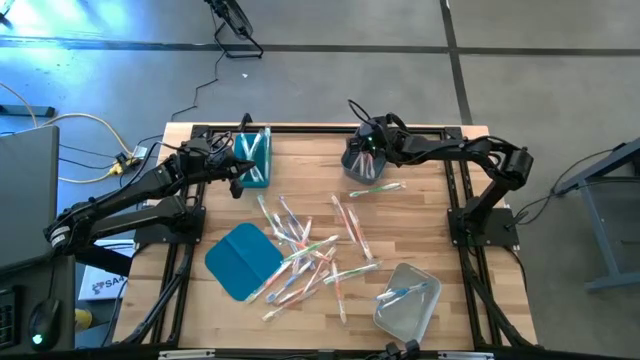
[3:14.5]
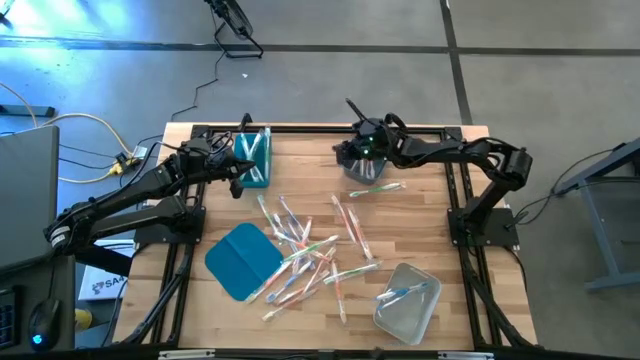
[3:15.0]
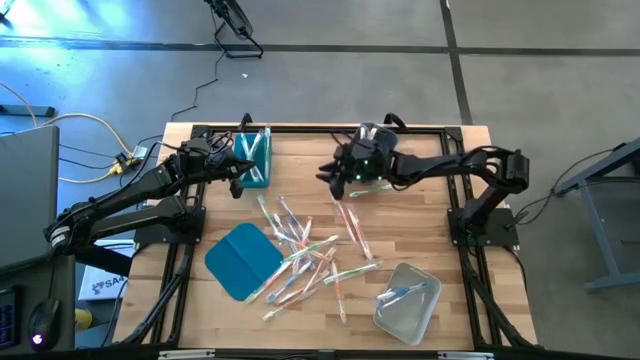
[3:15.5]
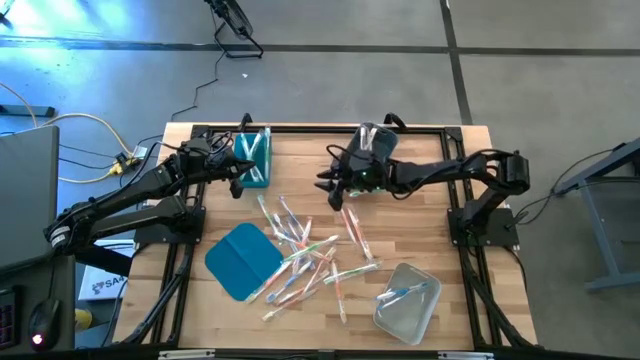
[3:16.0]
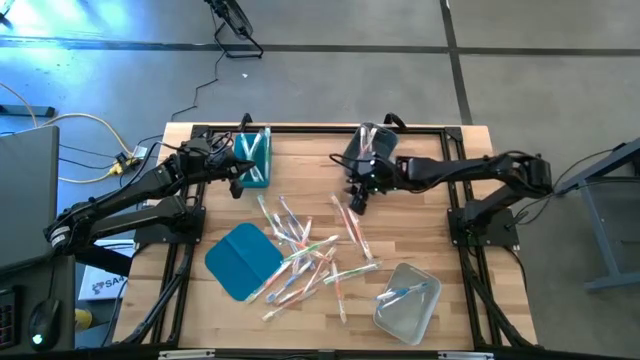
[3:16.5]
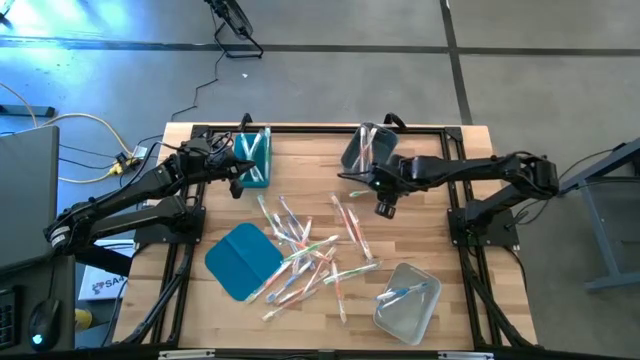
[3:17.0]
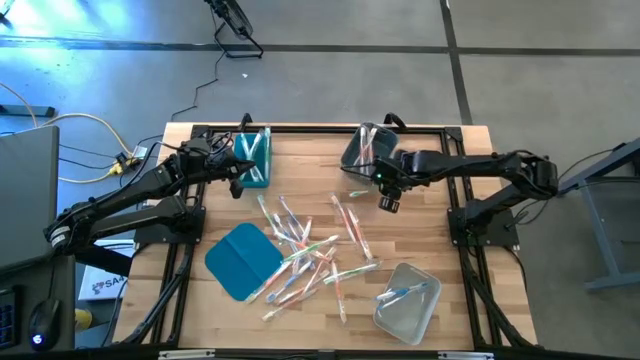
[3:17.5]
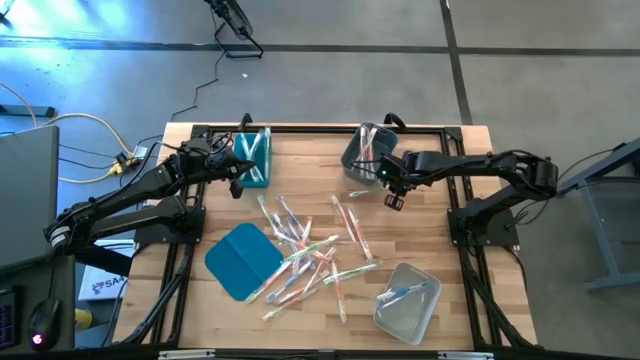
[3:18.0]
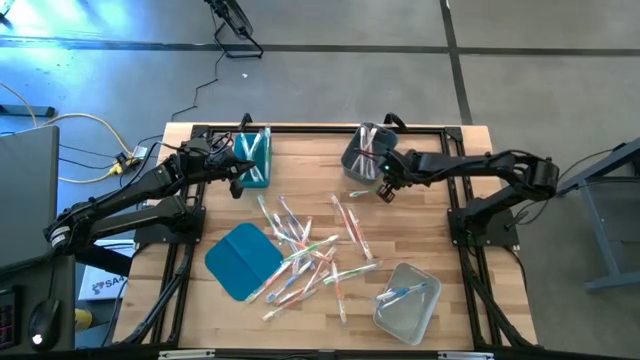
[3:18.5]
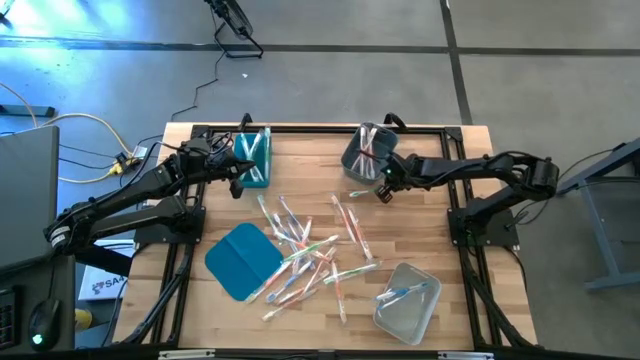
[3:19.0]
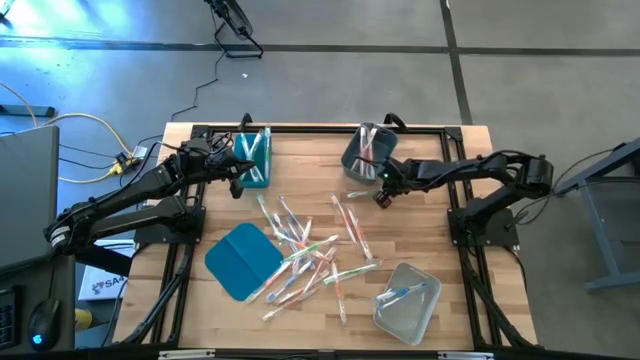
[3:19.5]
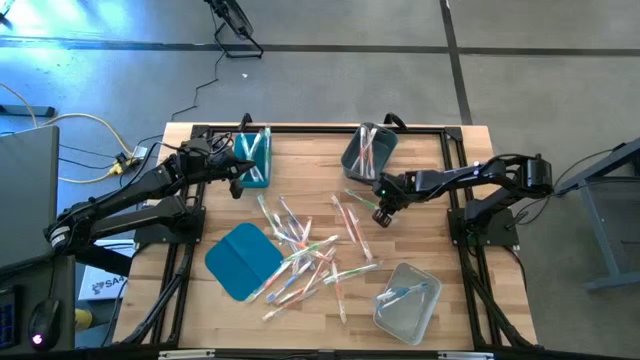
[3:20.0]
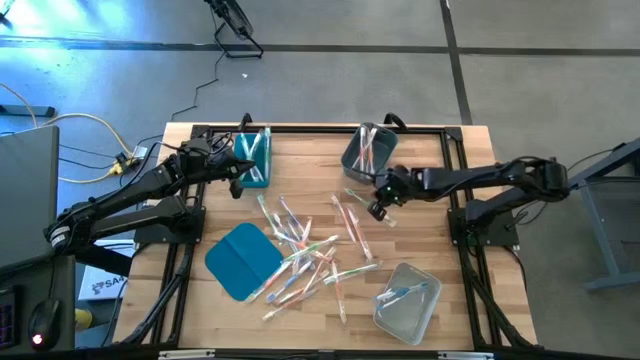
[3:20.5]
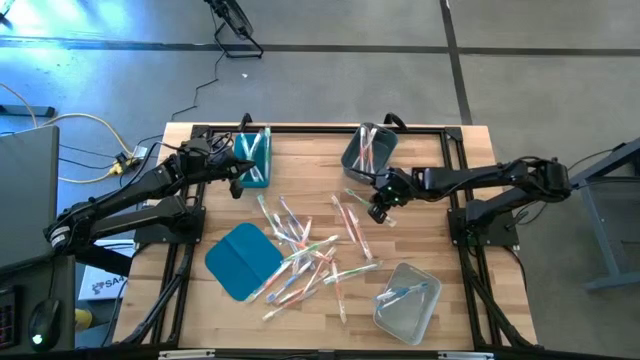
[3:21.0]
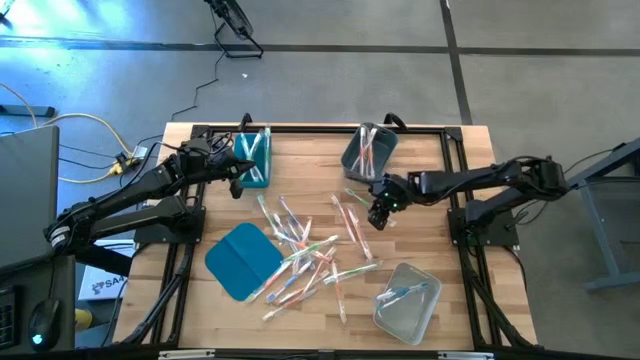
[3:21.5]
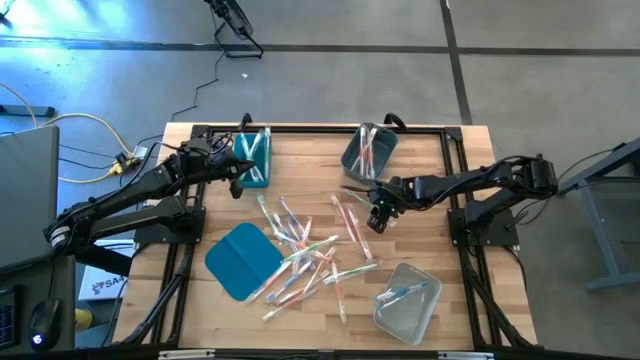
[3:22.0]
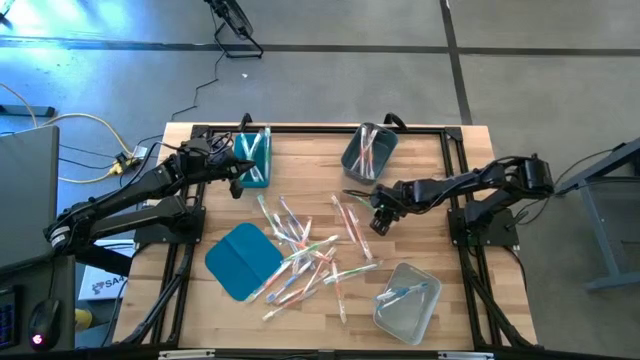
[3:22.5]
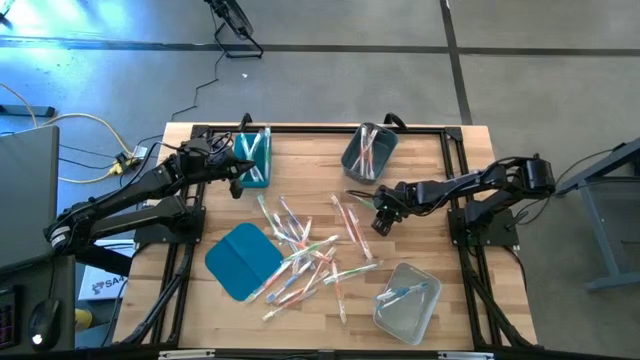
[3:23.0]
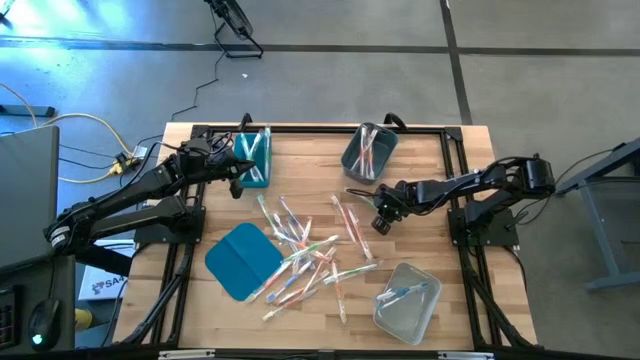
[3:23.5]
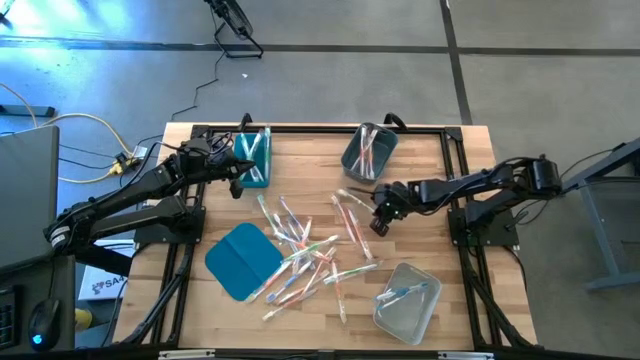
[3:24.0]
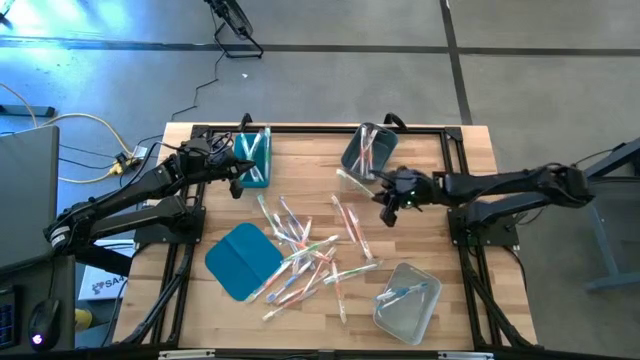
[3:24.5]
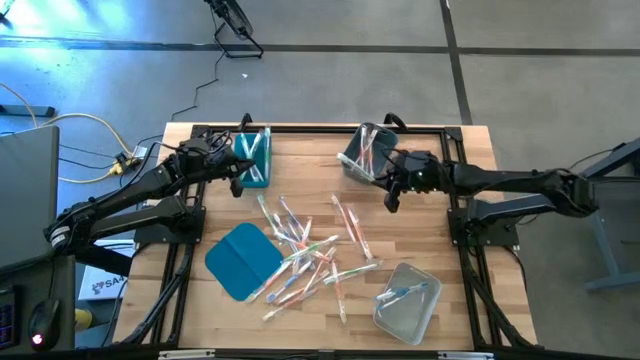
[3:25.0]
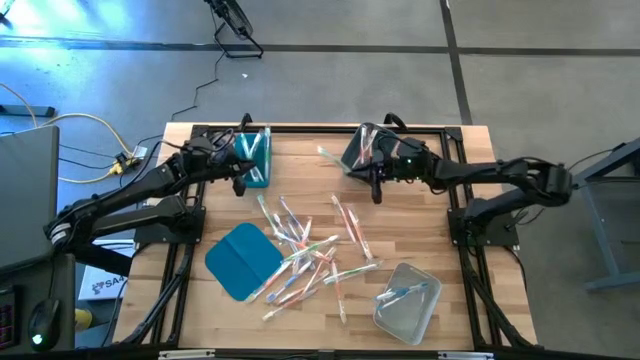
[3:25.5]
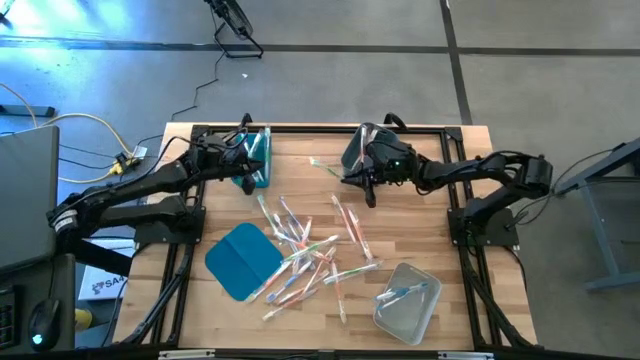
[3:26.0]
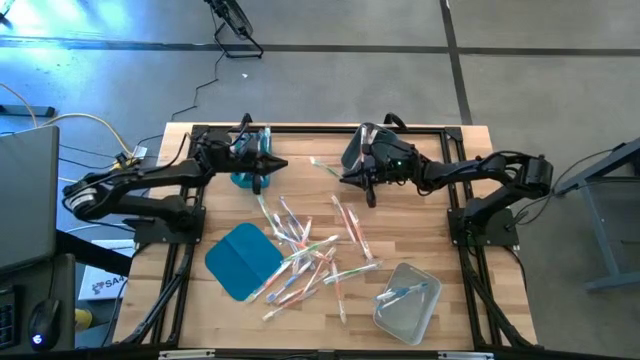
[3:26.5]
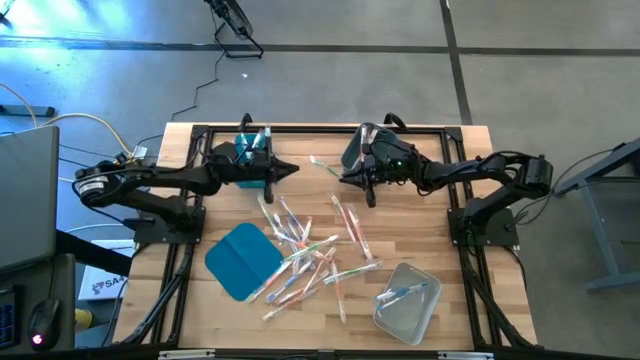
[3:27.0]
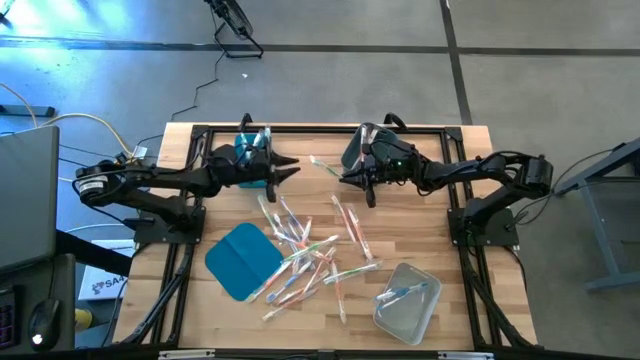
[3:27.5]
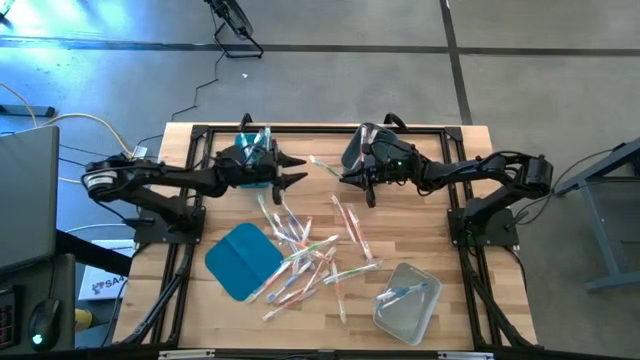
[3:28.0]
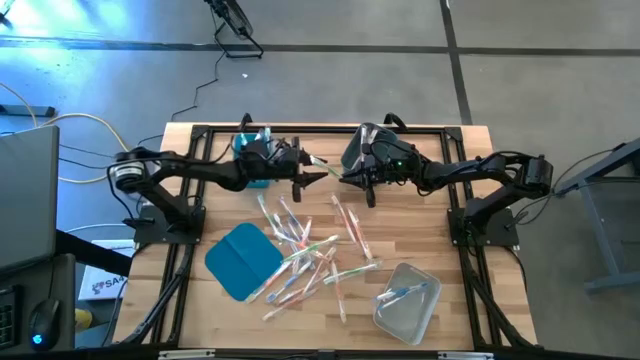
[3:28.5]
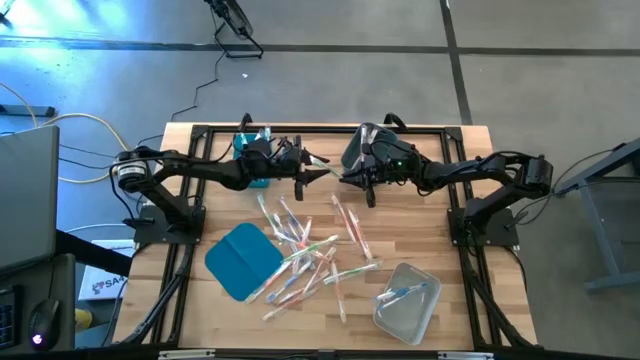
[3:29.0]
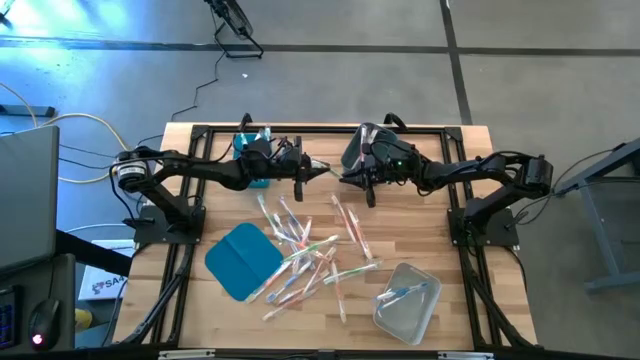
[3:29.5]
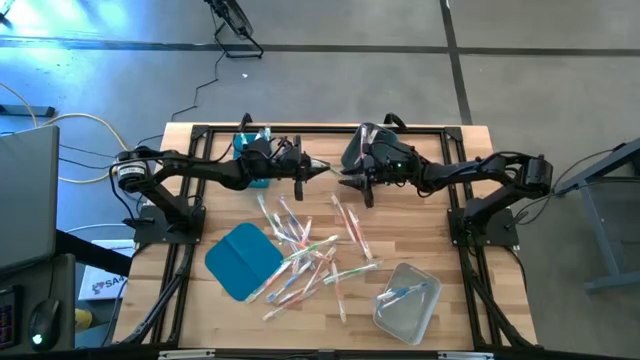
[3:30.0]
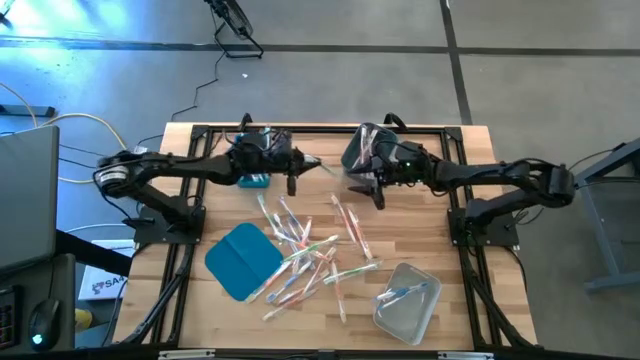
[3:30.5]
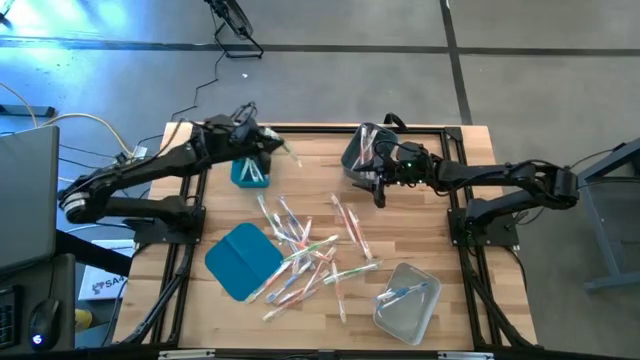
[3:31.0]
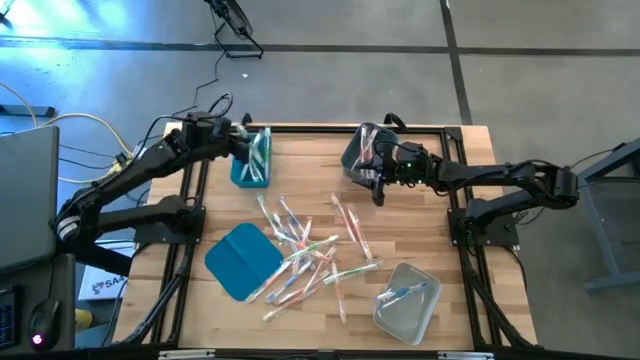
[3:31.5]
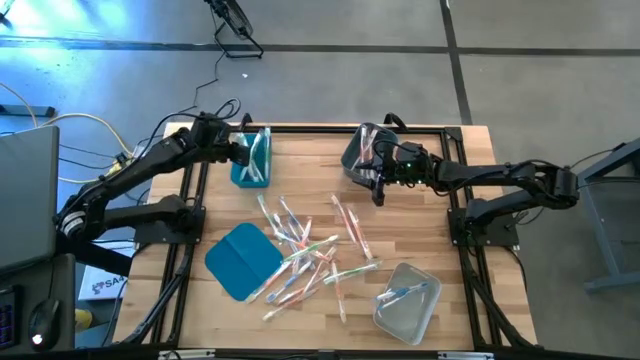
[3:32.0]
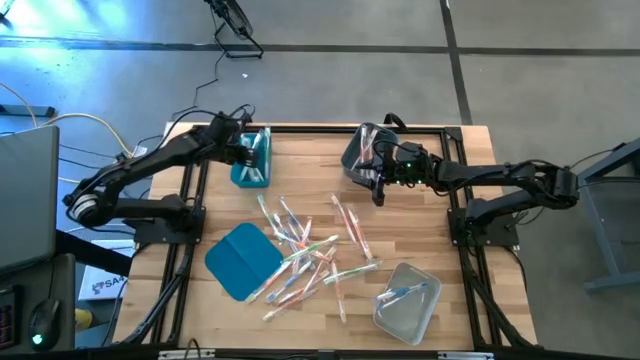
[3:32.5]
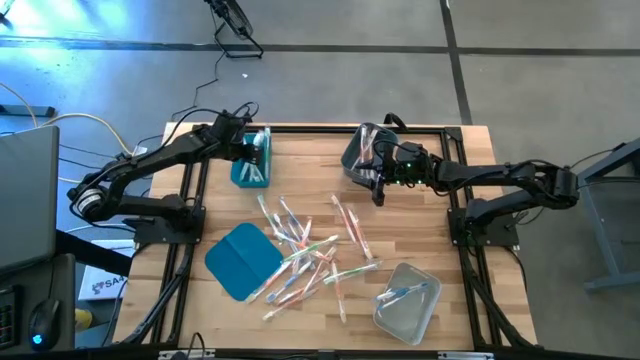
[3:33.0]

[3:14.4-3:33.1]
Task: Pick & Place Toothbrushes
Put the green toothbrush into the blue bin
